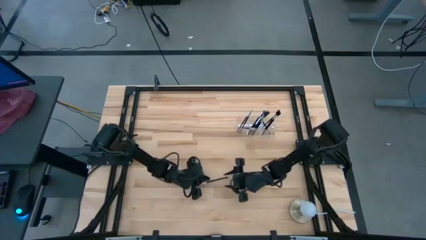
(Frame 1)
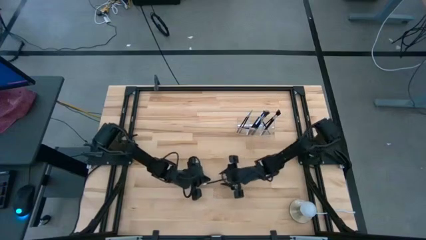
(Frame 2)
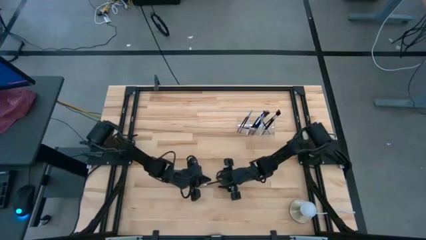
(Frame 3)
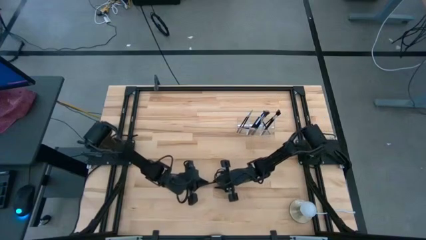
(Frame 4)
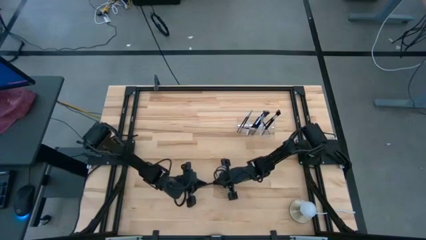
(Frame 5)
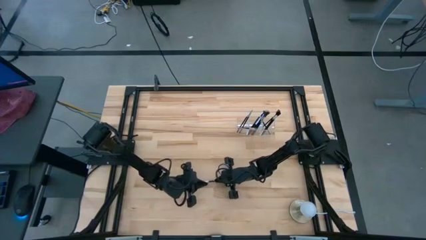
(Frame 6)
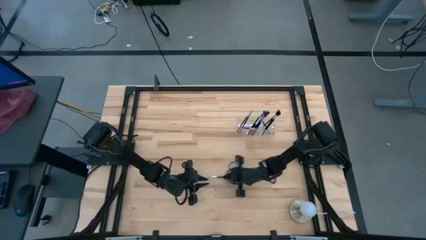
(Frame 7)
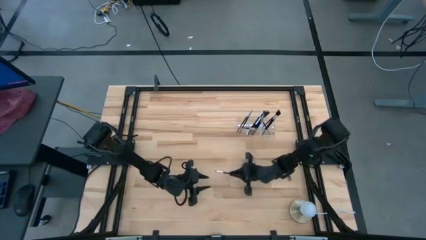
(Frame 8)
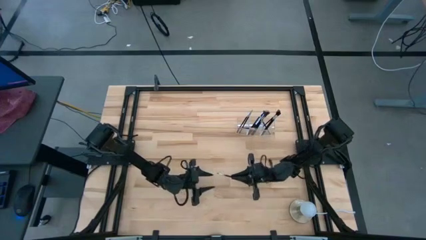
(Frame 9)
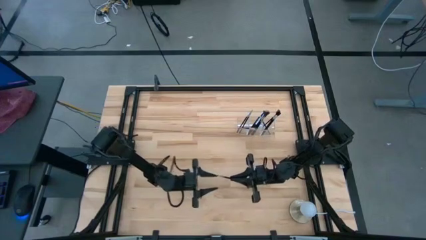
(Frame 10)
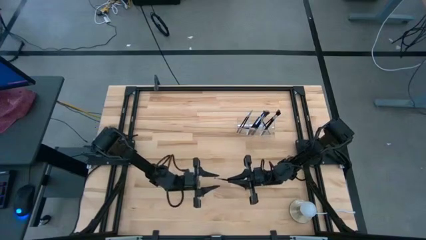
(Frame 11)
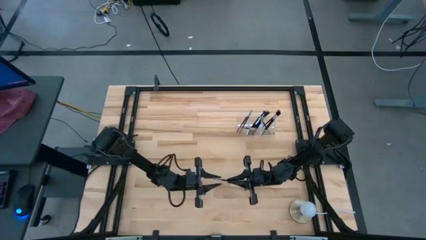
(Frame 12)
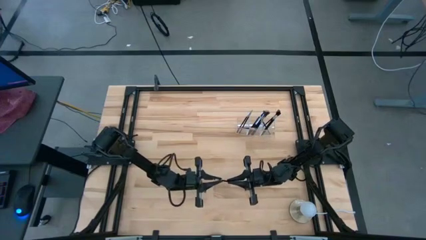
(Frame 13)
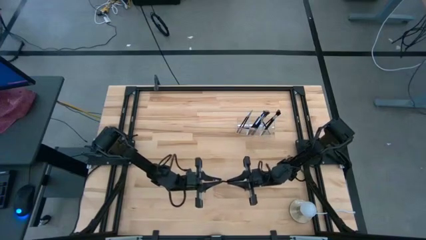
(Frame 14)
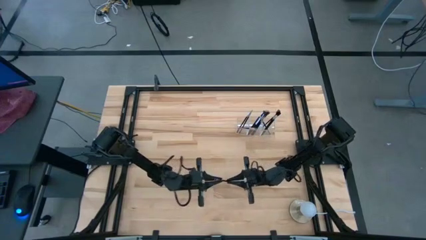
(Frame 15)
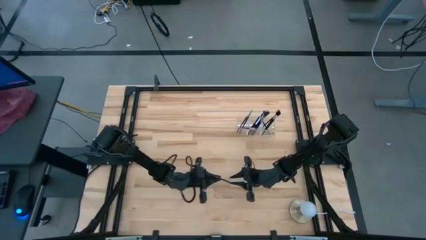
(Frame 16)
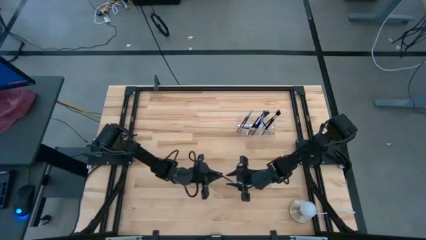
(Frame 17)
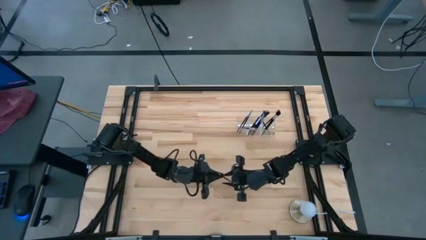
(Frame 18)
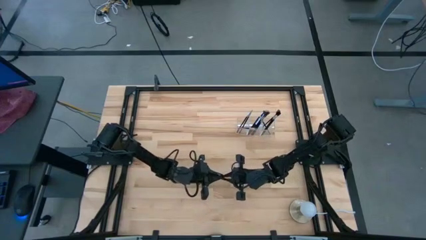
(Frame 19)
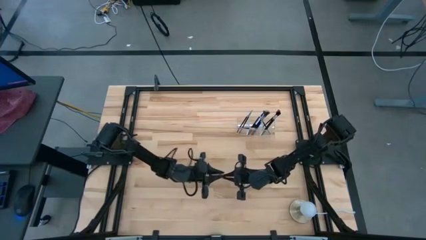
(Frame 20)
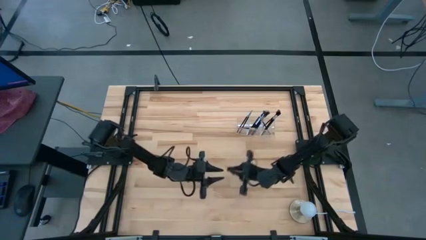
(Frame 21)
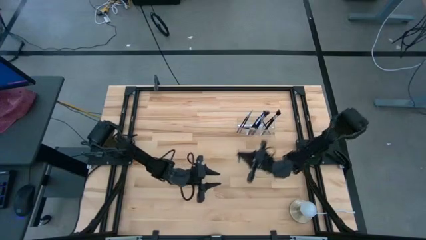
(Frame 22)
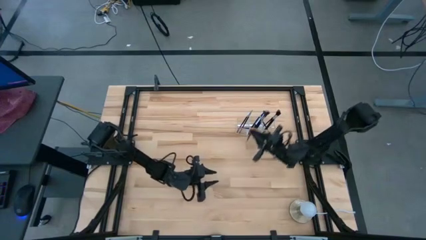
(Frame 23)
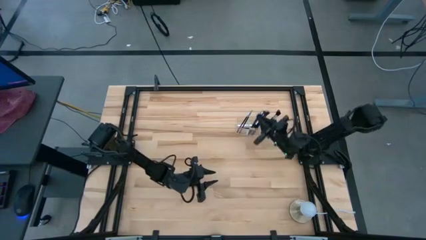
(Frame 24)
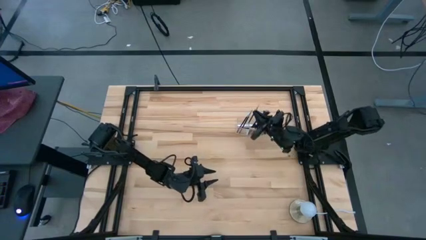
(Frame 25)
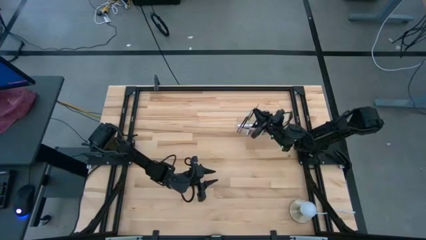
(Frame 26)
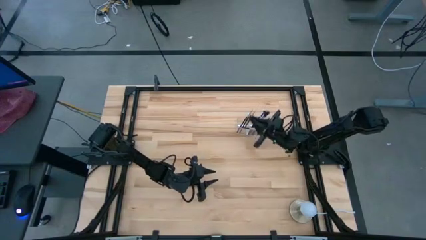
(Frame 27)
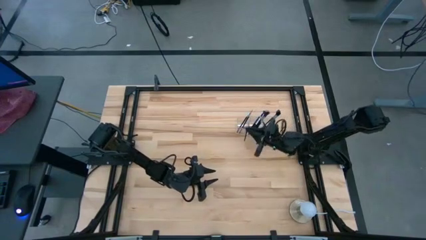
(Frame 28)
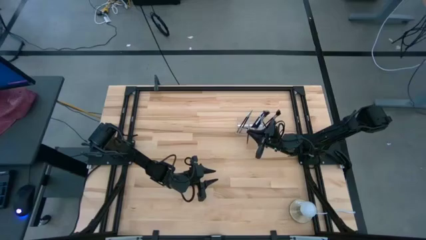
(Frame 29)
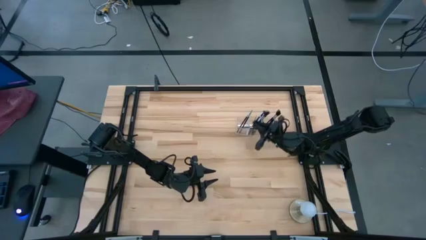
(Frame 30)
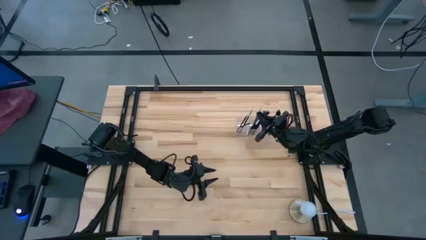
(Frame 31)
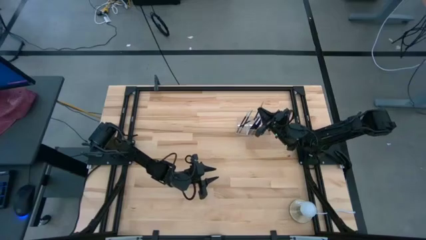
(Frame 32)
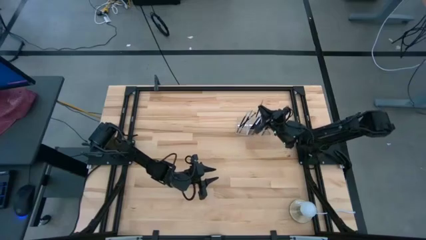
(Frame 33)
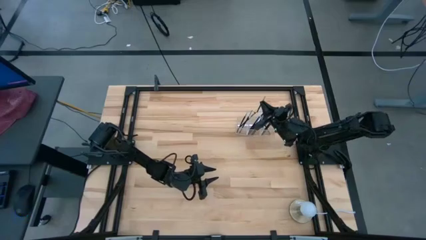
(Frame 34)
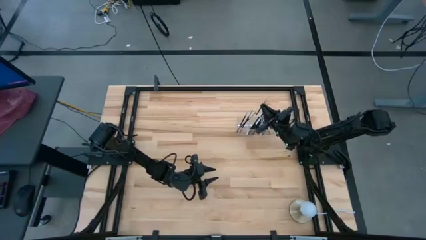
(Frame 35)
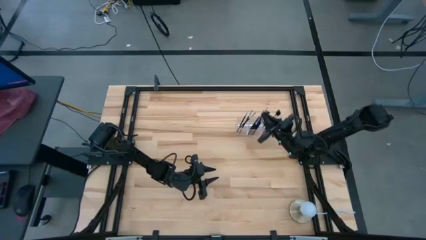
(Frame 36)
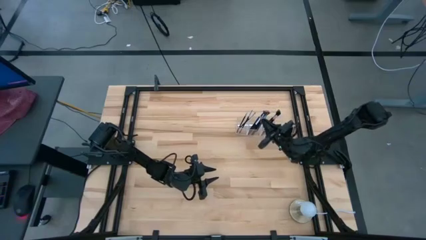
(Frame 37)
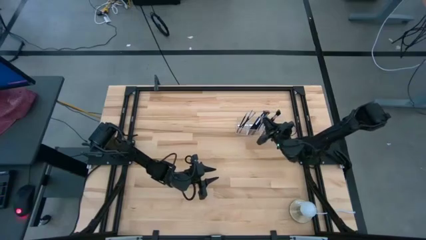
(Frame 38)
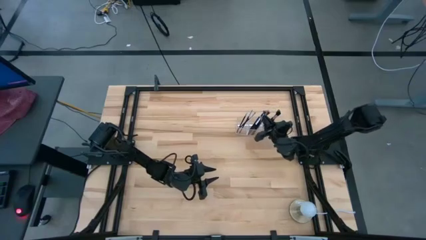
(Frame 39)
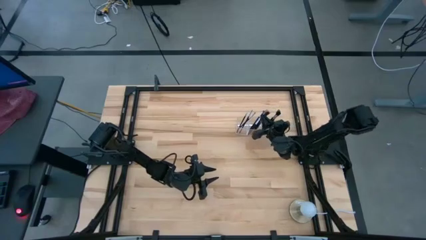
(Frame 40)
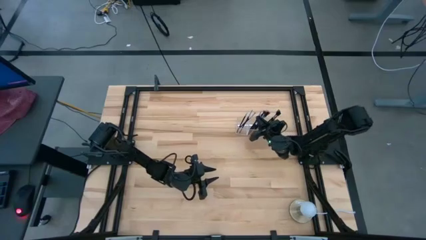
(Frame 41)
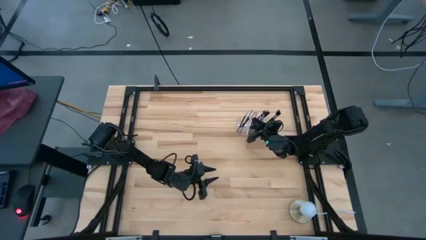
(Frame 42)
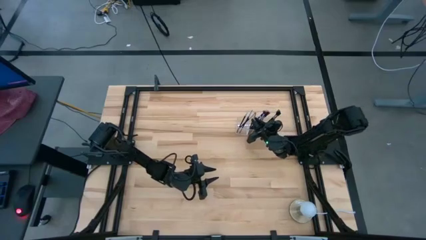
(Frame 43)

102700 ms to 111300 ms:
Task: Put items in baskets/containers
Put the black eyeshadow brush into the transparent organizer

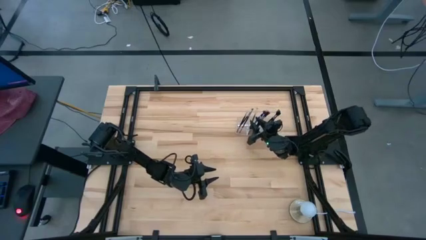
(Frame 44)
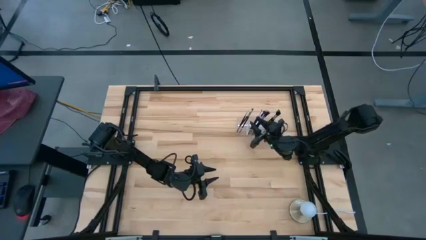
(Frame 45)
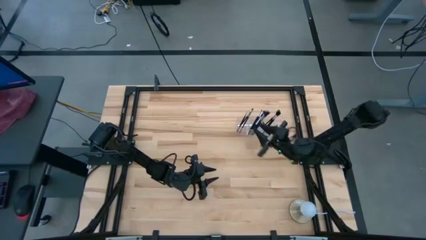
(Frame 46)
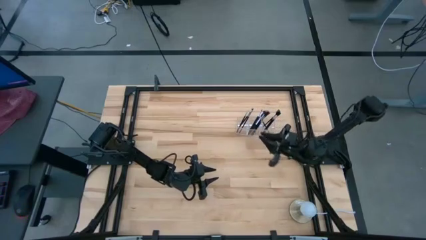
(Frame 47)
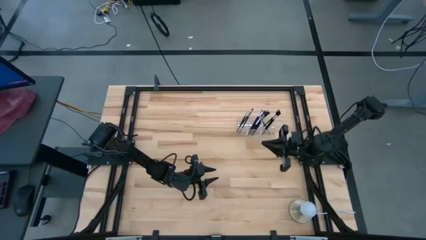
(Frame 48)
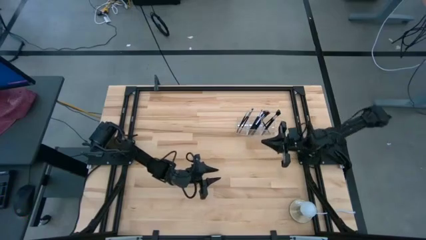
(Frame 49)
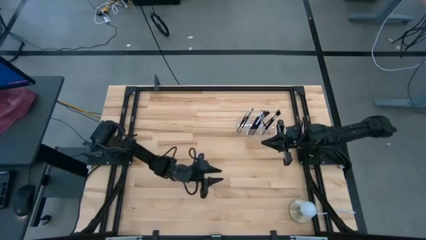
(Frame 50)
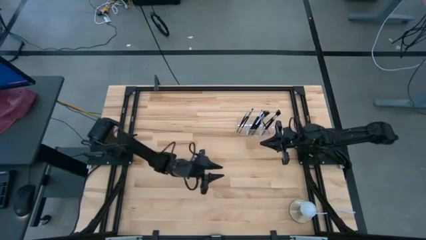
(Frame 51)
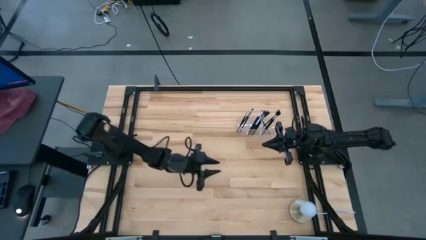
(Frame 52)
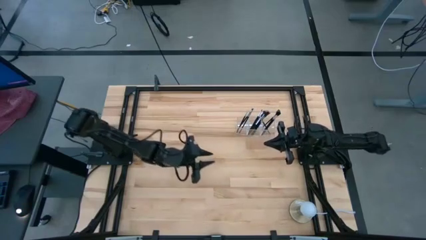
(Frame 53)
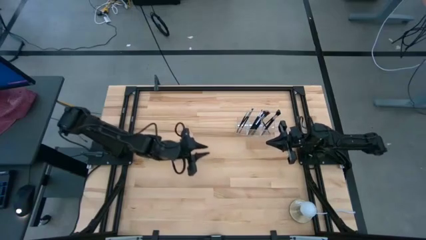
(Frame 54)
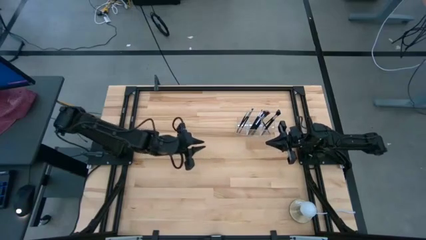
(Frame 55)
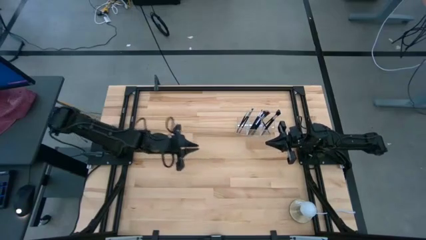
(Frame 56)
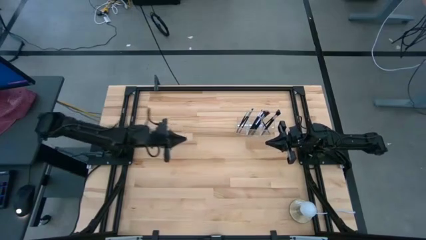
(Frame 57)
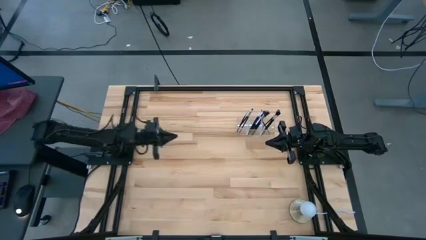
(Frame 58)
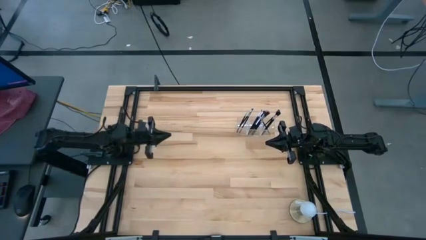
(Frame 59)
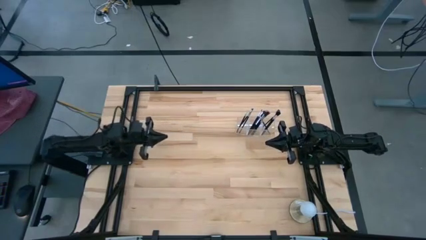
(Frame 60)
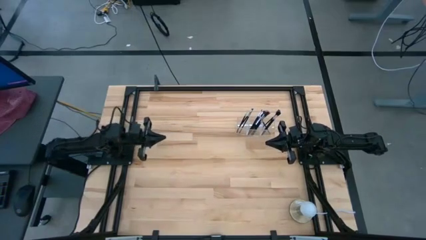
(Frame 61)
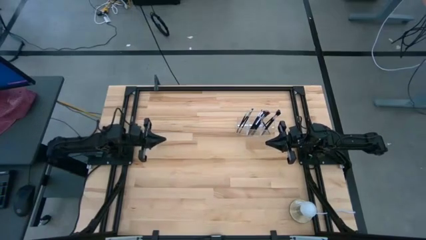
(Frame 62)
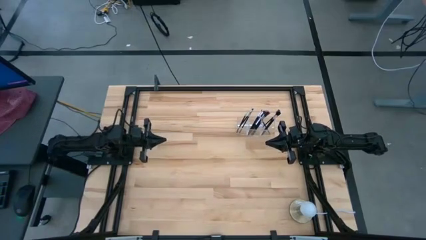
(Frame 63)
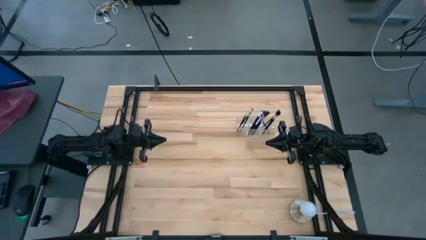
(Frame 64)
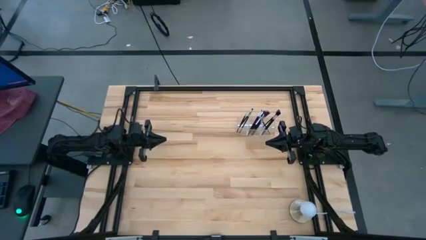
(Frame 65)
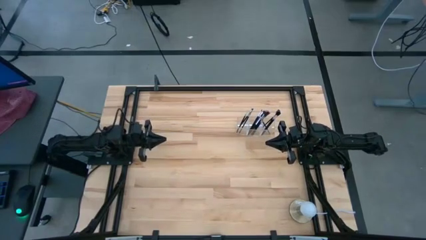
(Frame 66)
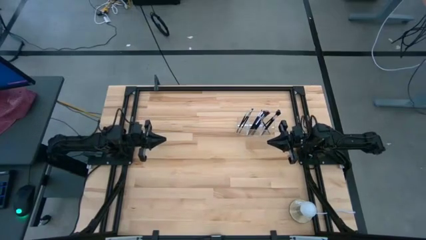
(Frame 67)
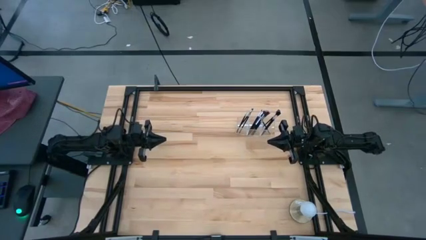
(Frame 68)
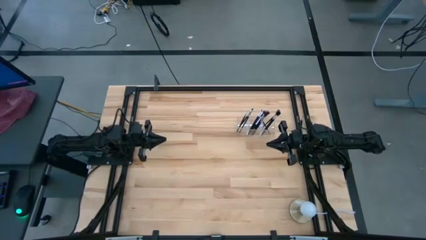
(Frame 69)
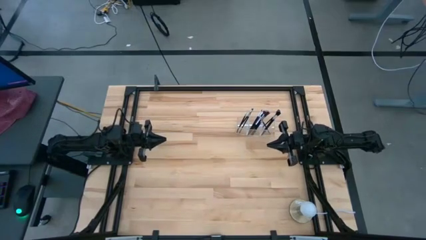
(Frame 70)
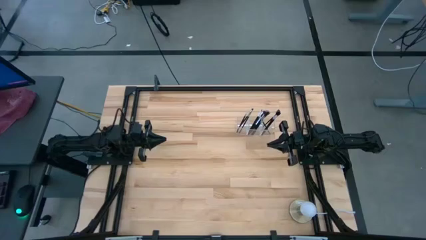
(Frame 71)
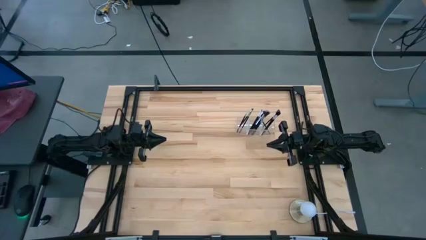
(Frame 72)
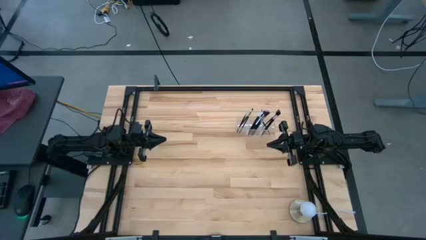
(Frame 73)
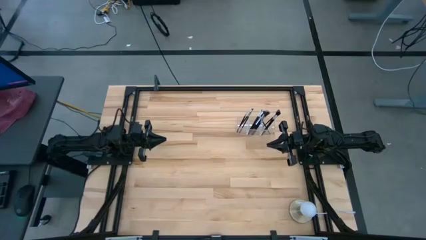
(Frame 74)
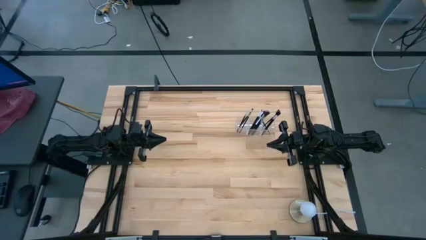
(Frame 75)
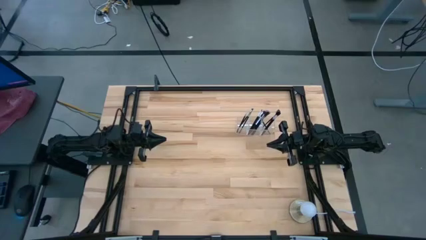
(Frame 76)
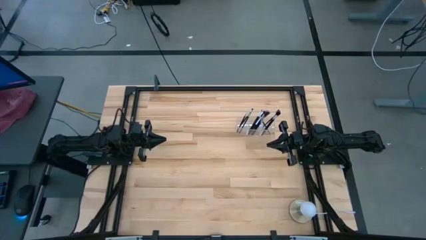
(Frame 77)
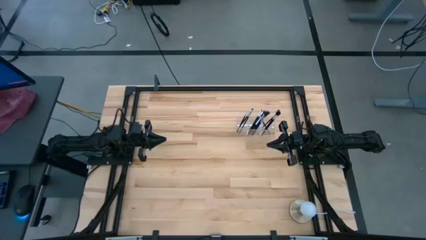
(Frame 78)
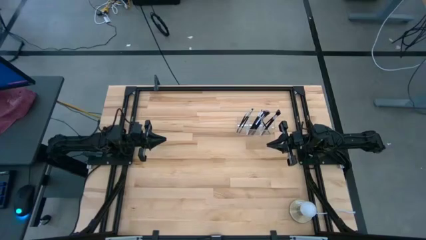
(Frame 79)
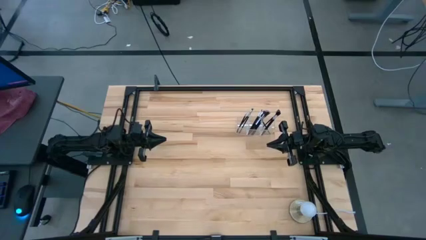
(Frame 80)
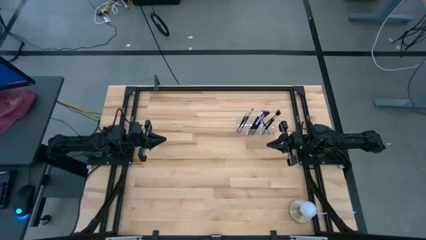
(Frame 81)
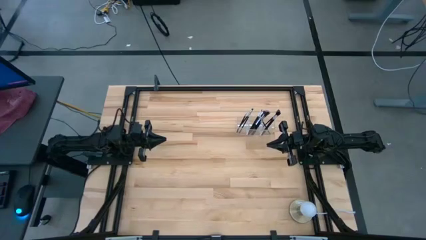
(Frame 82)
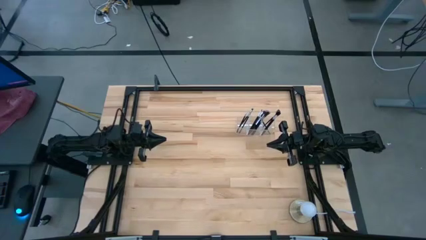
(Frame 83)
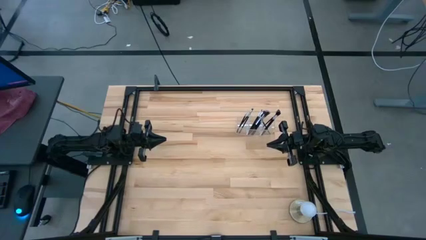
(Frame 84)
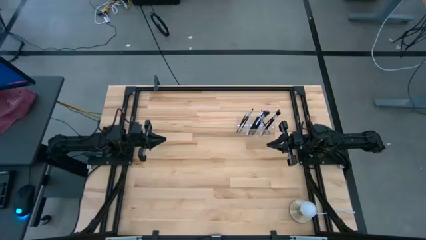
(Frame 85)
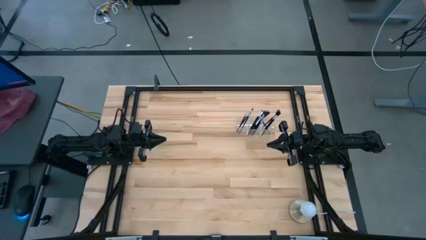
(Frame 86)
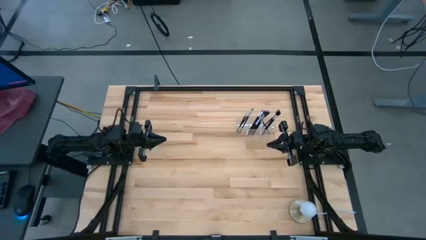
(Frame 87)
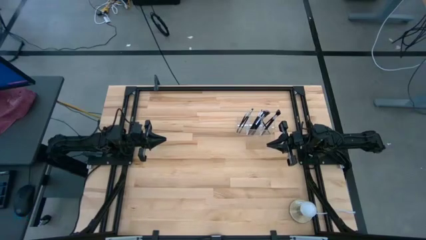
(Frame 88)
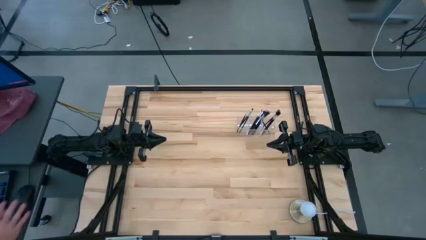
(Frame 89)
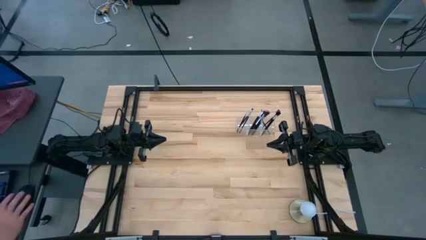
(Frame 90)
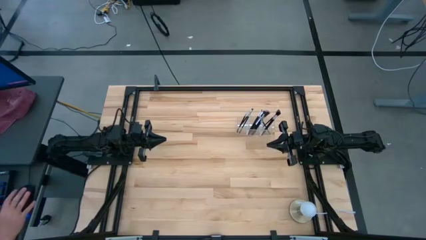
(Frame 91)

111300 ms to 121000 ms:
Return to Home Position
